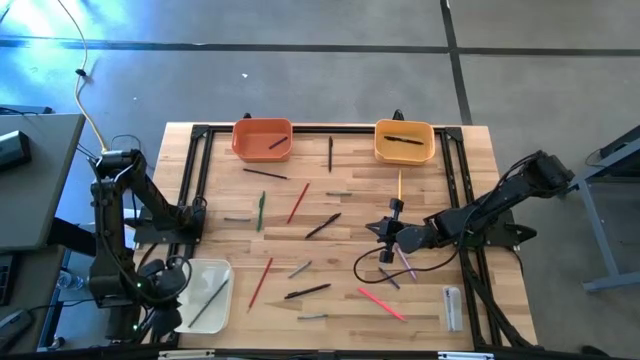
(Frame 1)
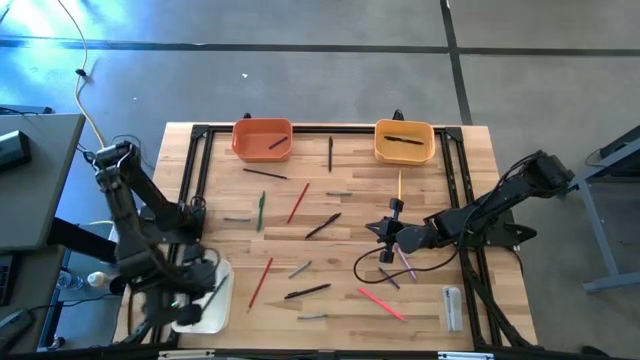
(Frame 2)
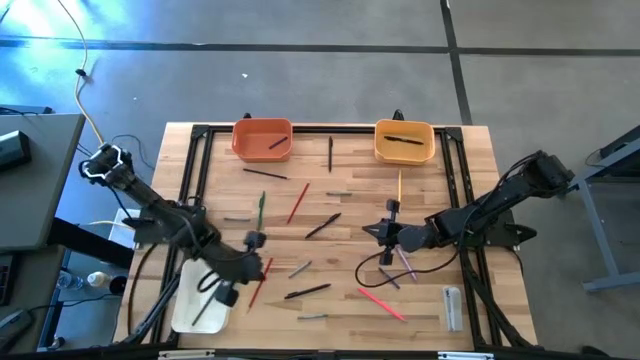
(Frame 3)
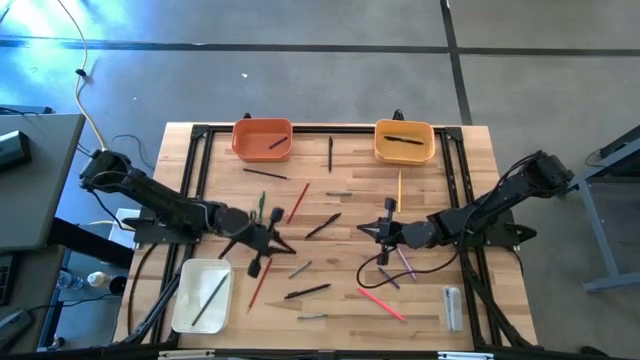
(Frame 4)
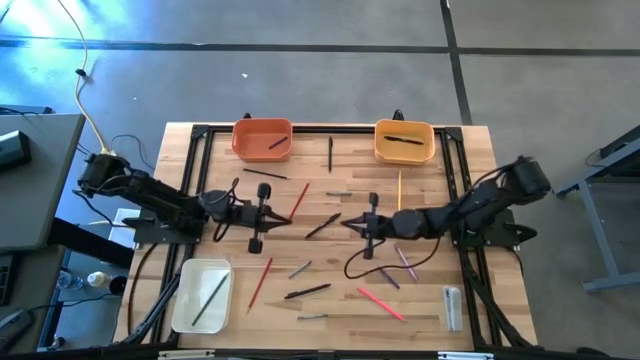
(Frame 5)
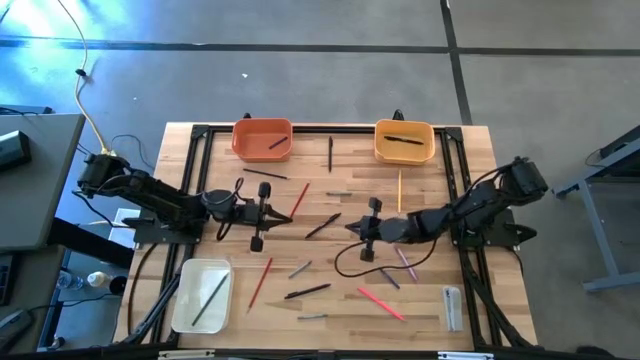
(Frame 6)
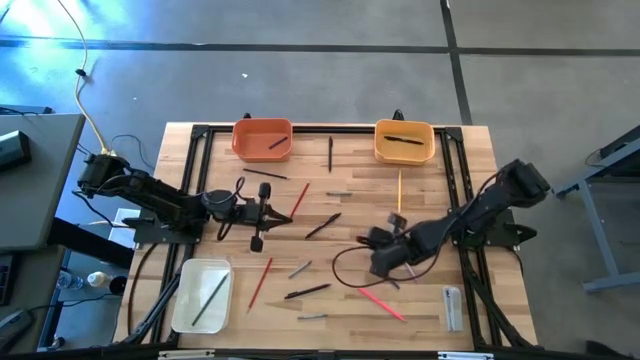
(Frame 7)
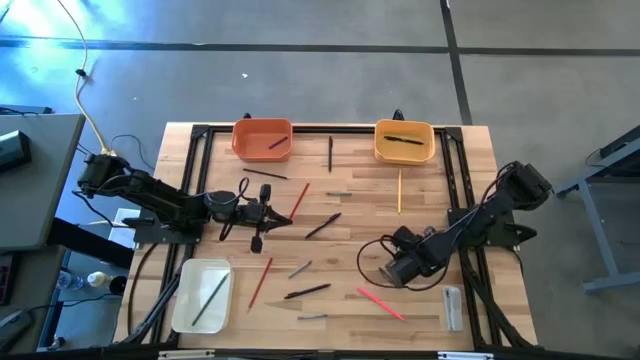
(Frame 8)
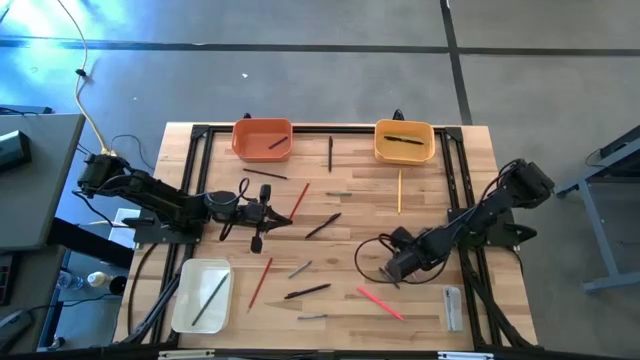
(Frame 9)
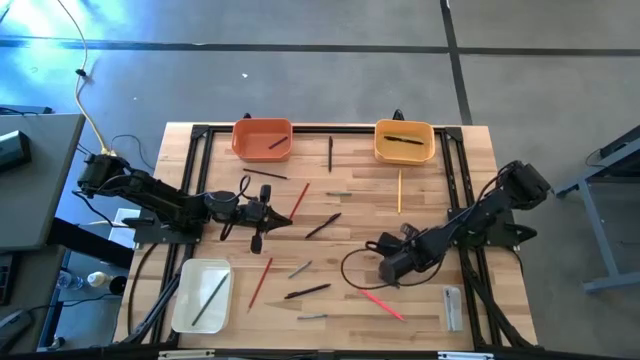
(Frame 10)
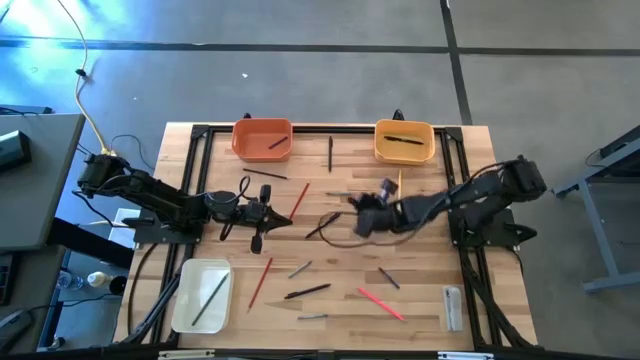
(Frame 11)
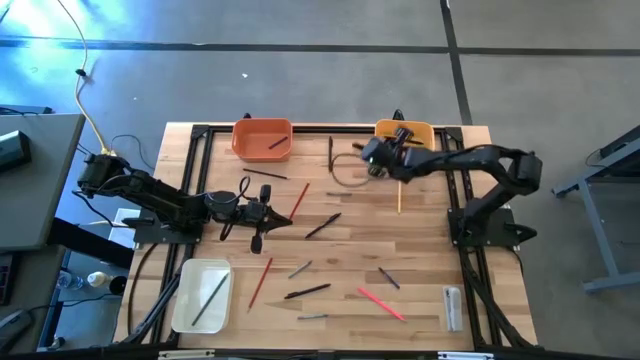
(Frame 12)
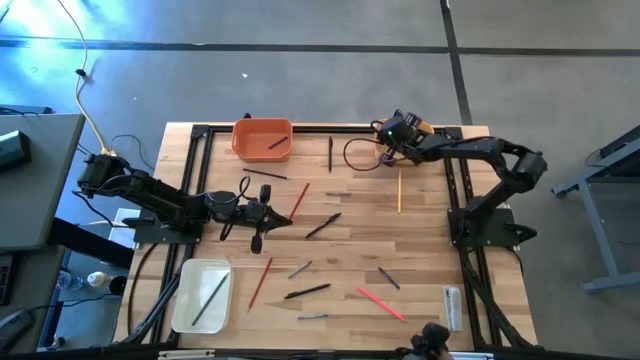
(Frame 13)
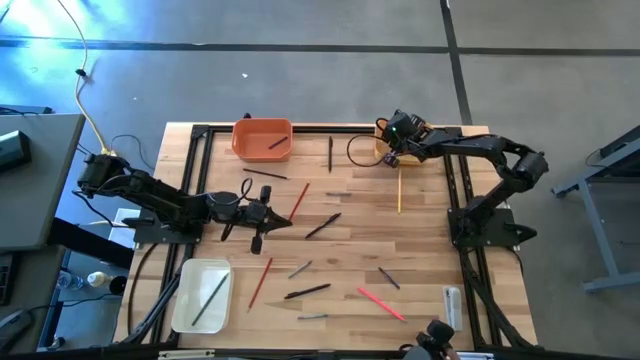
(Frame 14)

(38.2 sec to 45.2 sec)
Task: Sort crayons/erasers/pens/pencils in bins
Put the purple pen into the yellow bin

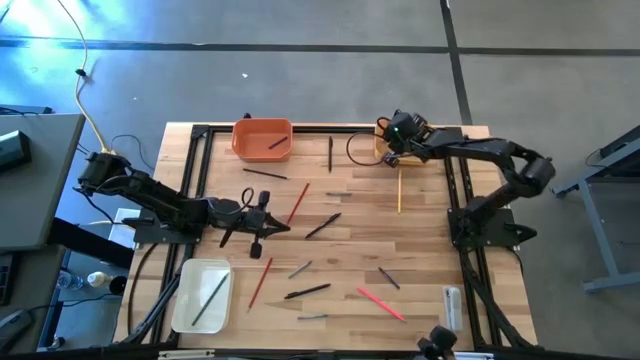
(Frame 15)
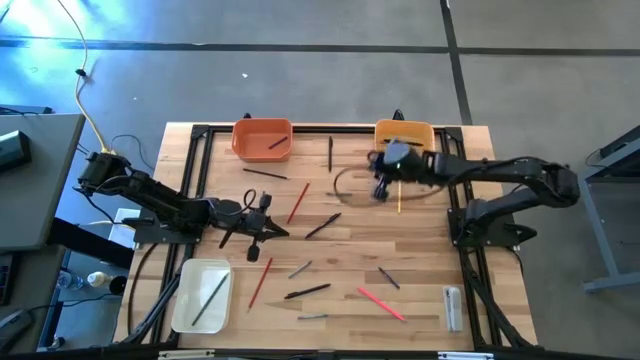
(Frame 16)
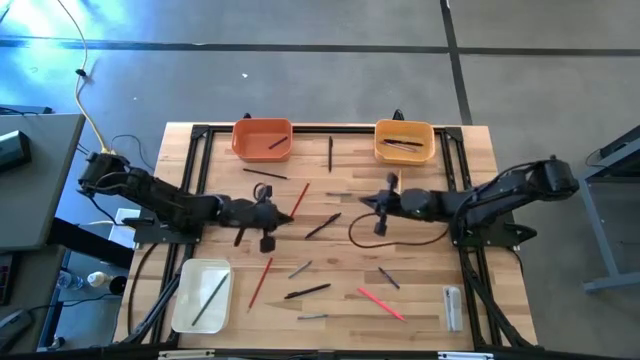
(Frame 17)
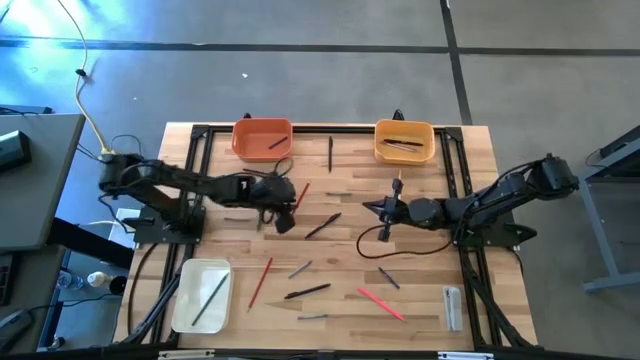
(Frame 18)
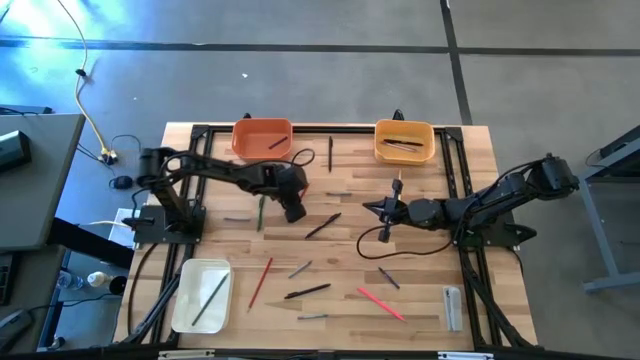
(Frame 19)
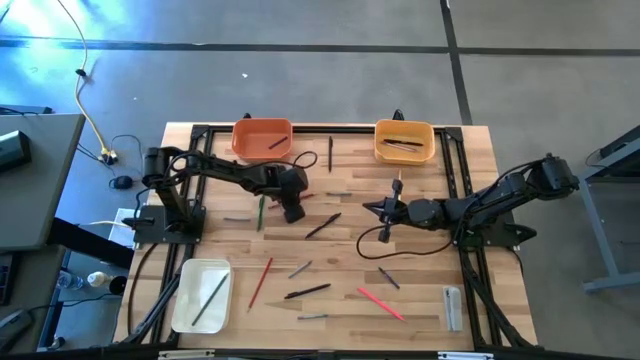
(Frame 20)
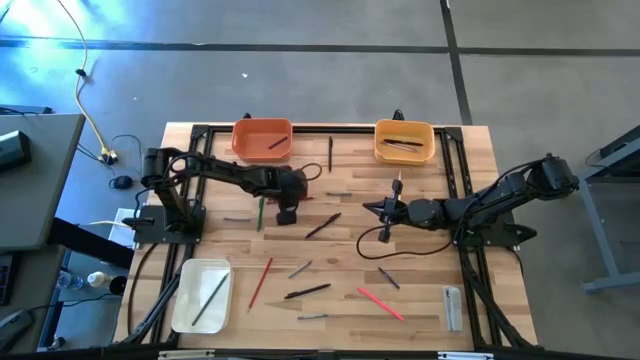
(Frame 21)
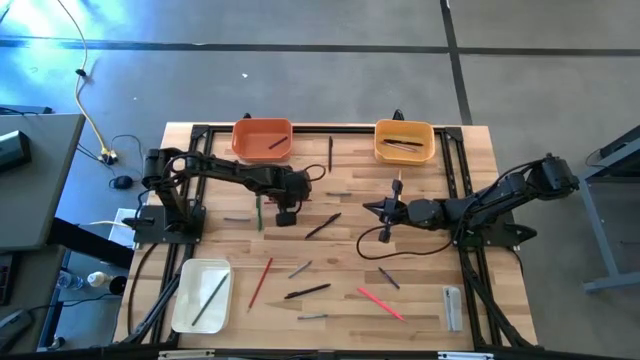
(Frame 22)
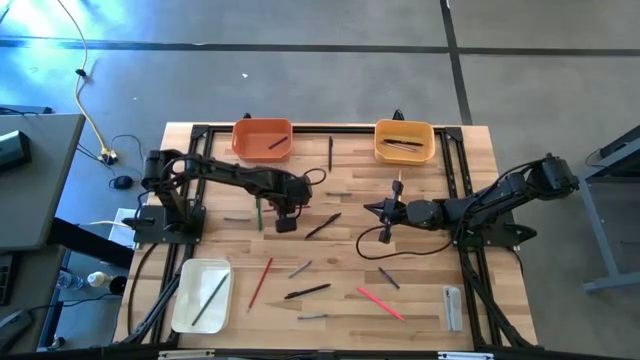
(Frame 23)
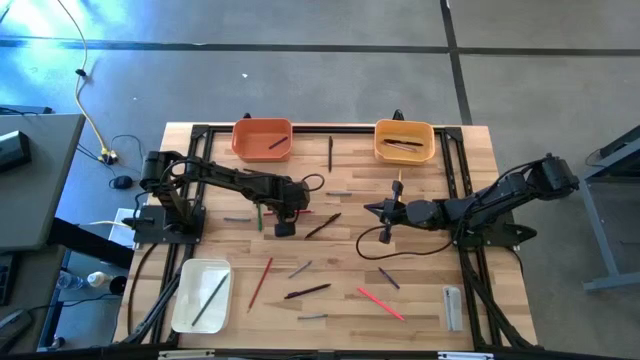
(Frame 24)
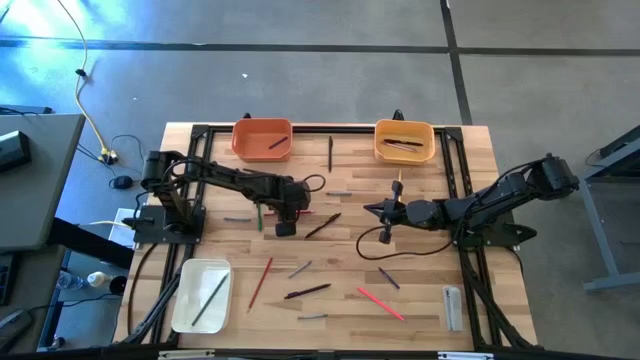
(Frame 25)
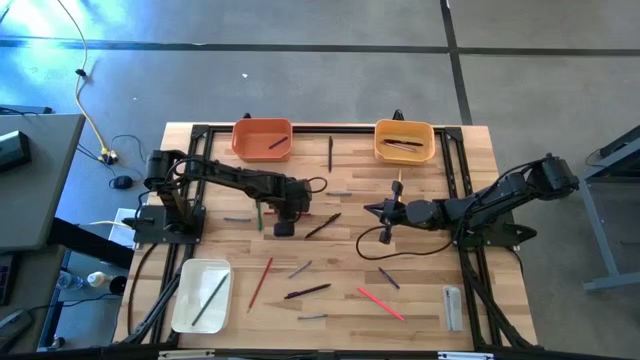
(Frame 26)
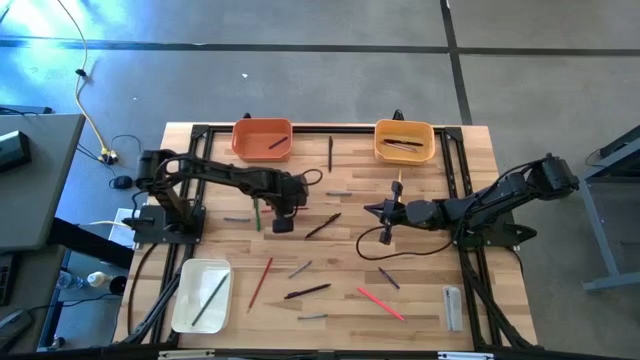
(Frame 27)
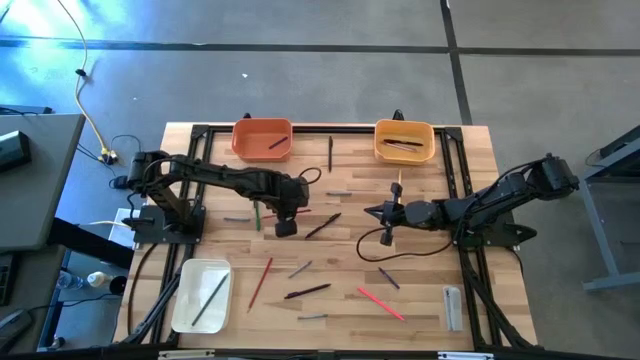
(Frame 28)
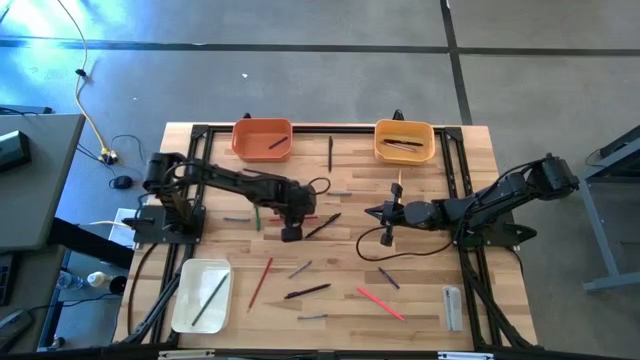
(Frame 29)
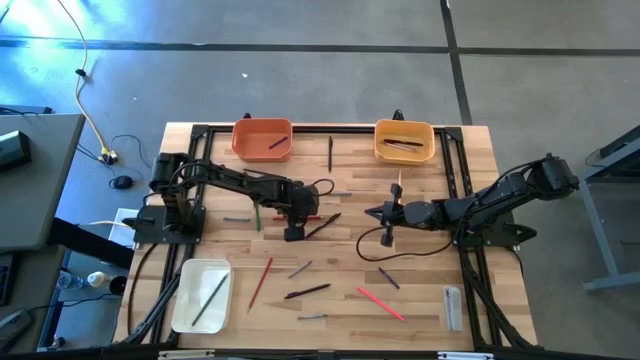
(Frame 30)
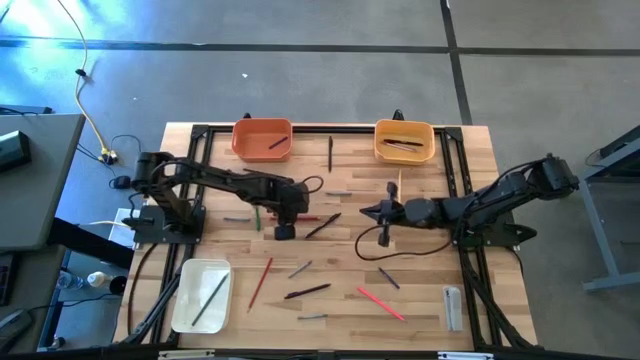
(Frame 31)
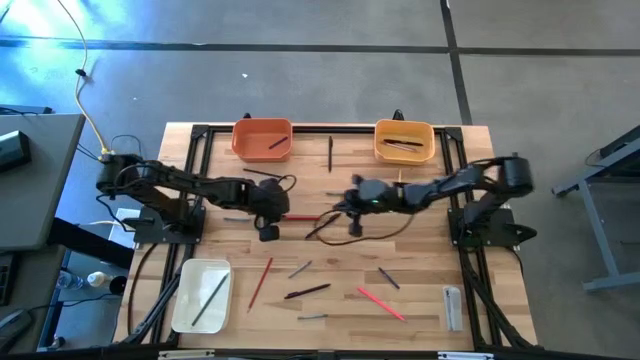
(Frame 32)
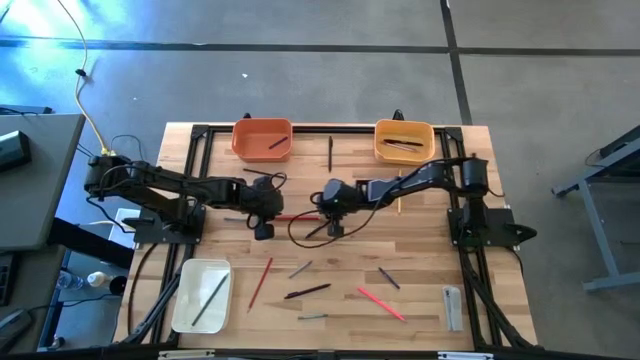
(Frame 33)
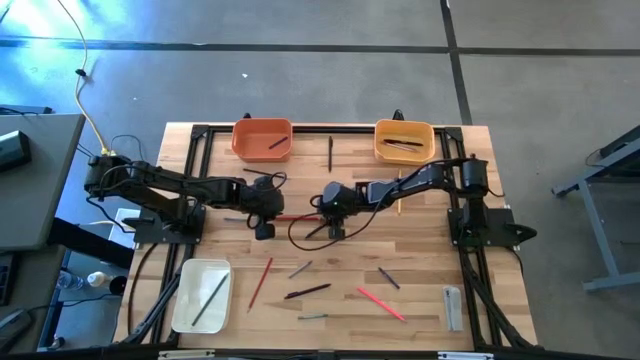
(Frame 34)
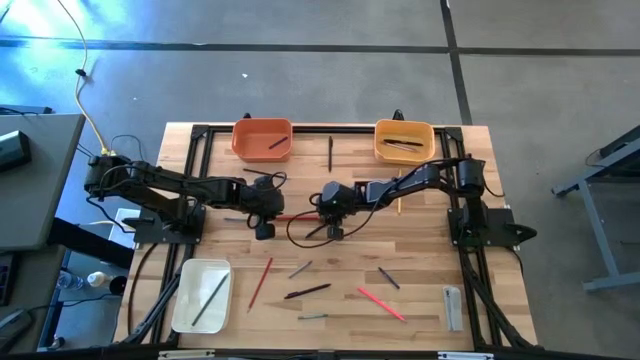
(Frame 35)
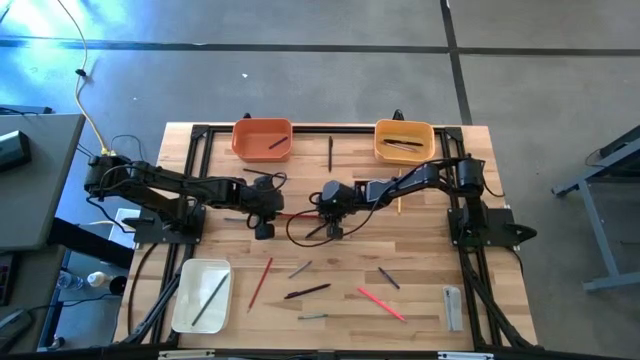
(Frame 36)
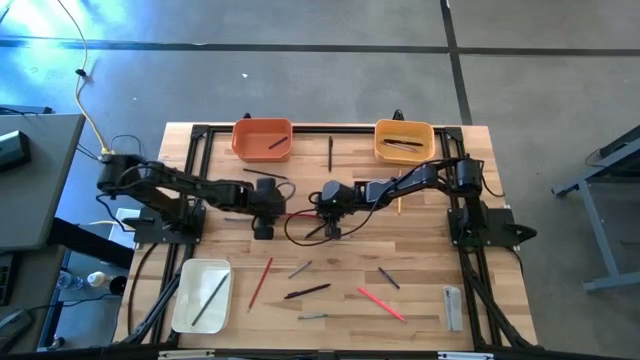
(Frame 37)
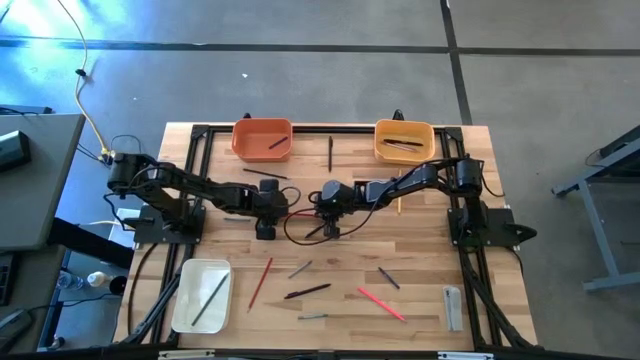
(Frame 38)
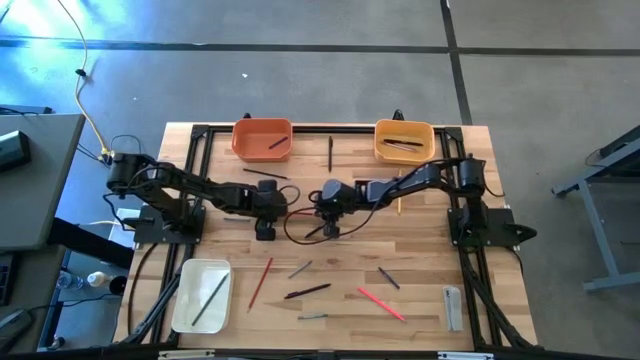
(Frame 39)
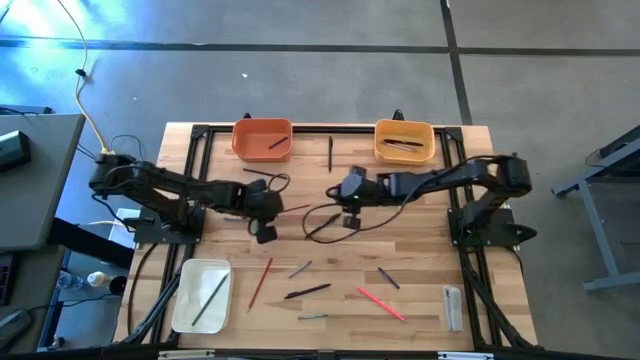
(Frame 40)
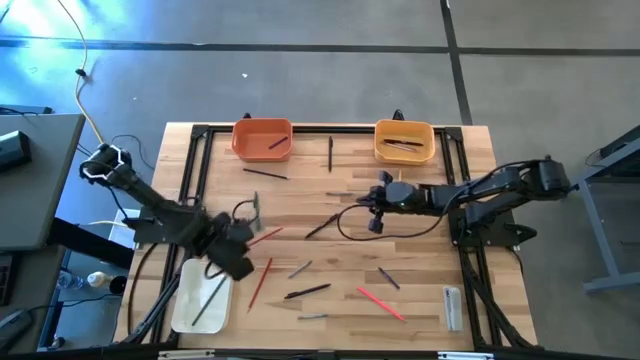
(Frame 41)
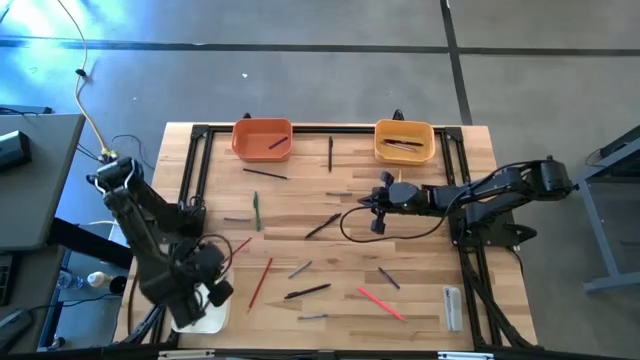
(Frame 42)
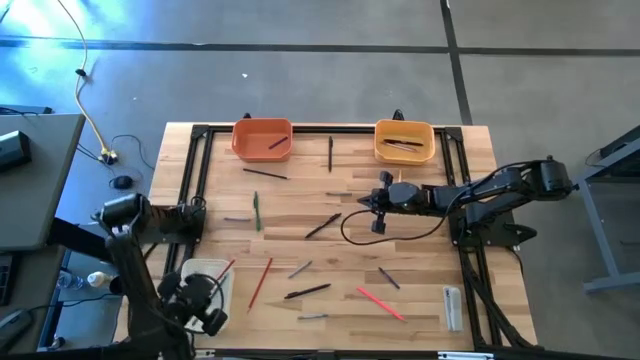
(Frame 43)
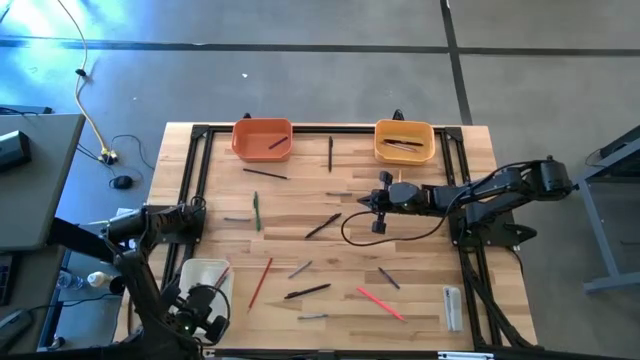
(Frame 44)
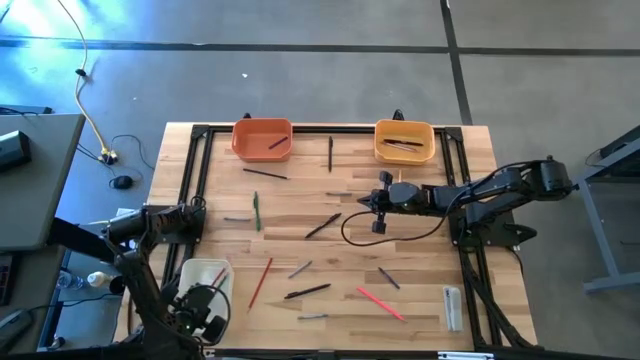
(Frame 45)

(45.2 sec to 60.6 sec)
Put the red colored pencil into the white bin
